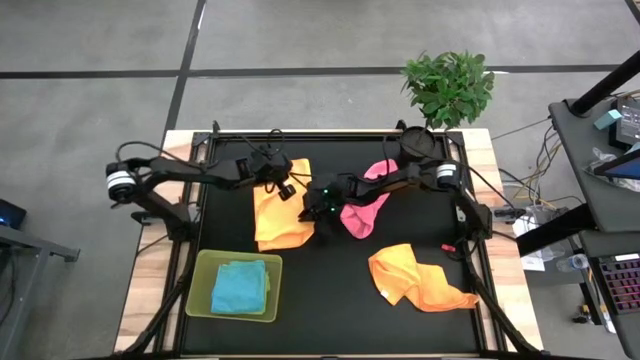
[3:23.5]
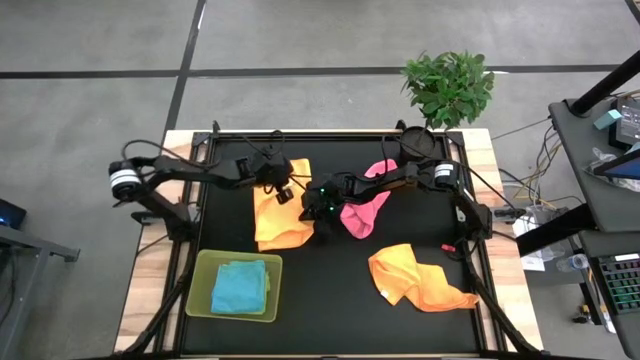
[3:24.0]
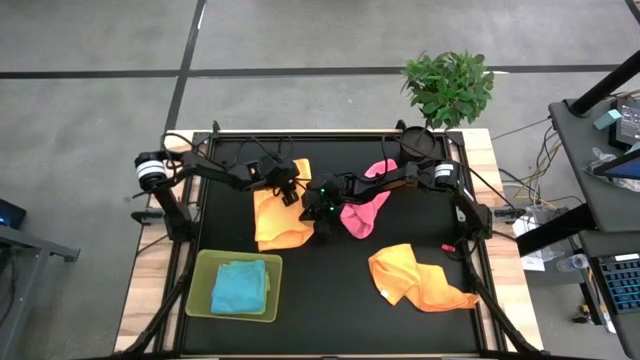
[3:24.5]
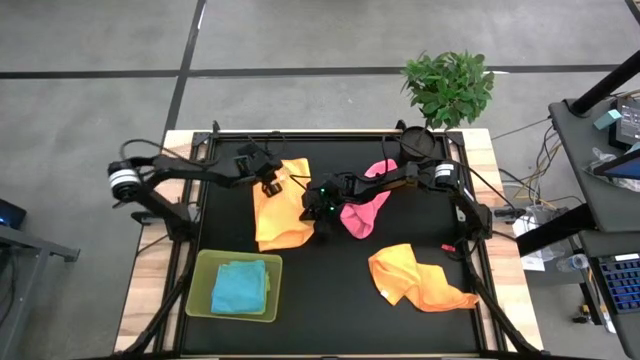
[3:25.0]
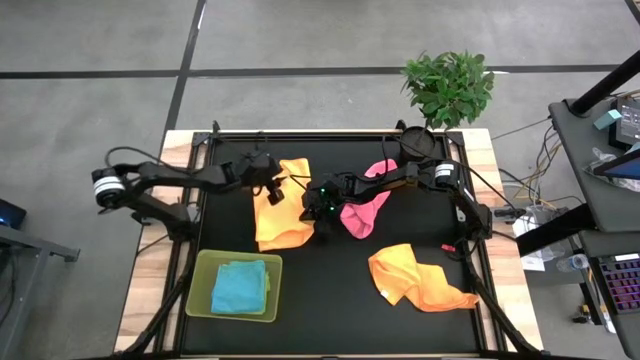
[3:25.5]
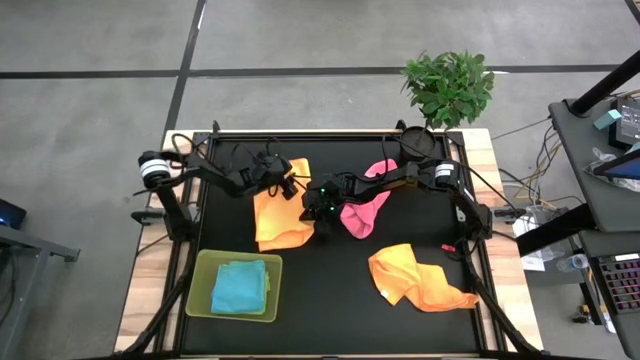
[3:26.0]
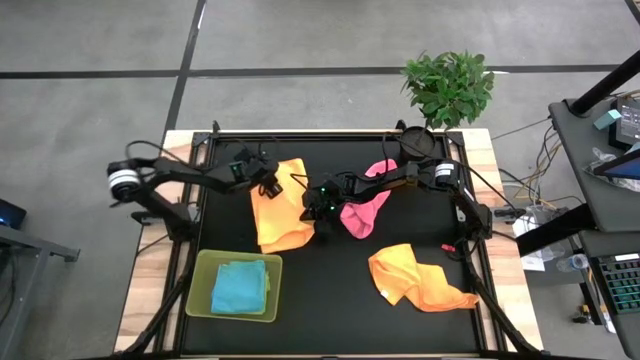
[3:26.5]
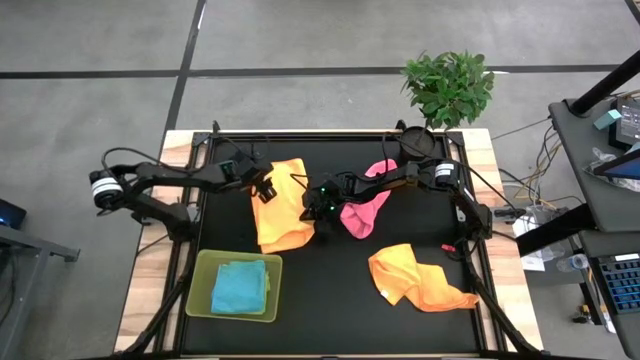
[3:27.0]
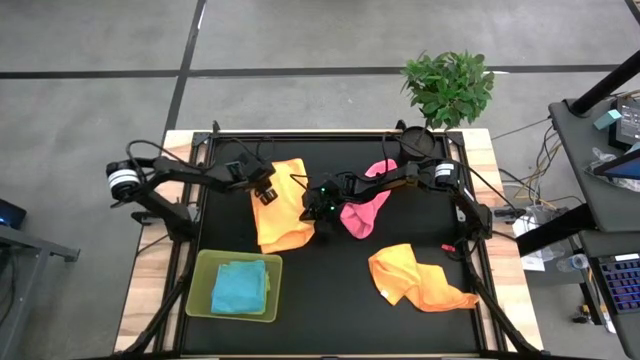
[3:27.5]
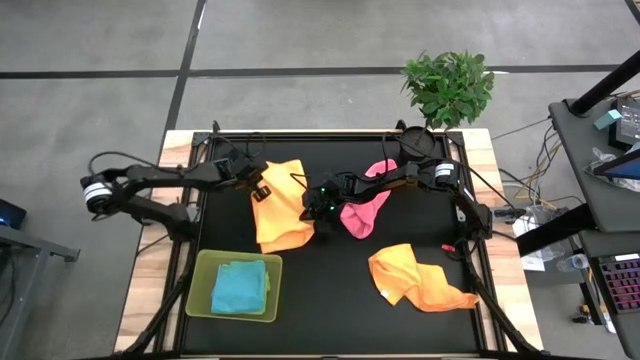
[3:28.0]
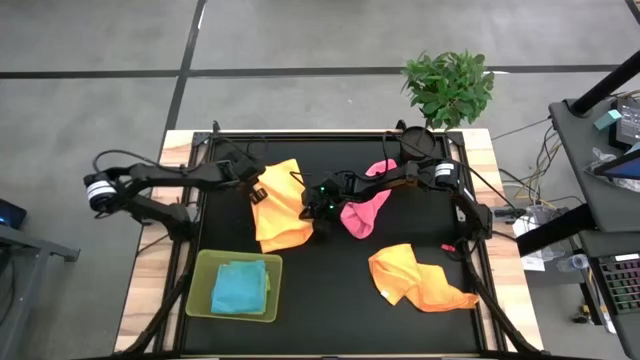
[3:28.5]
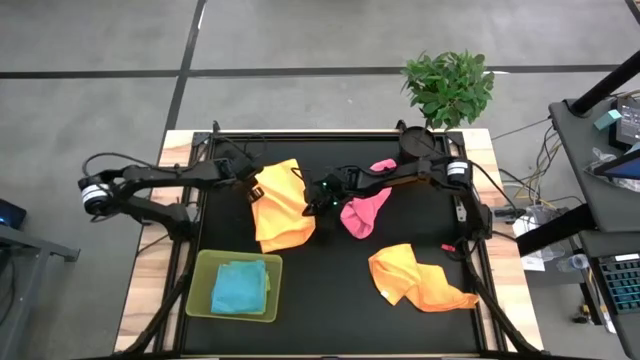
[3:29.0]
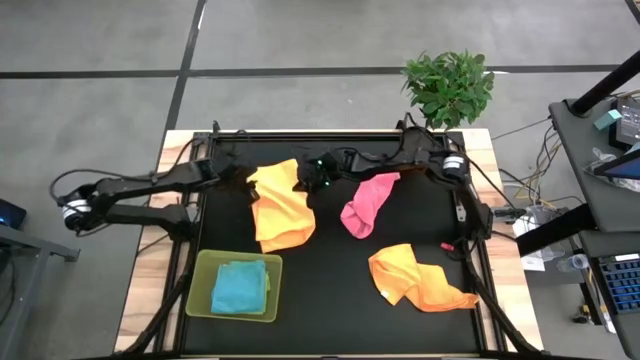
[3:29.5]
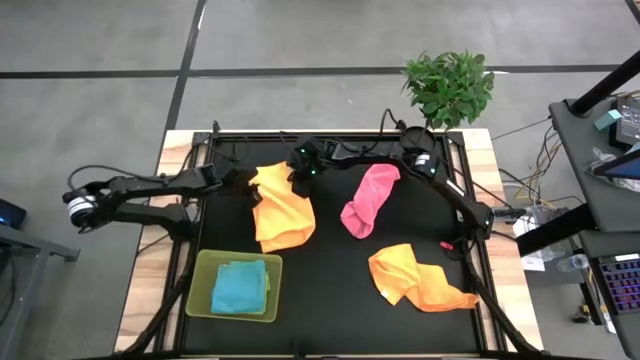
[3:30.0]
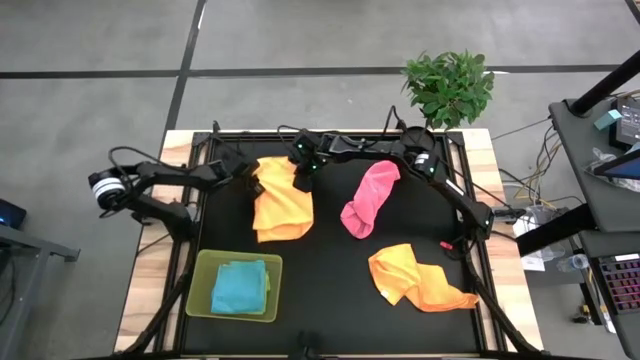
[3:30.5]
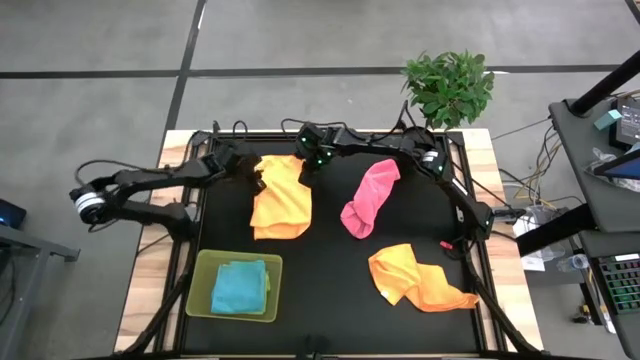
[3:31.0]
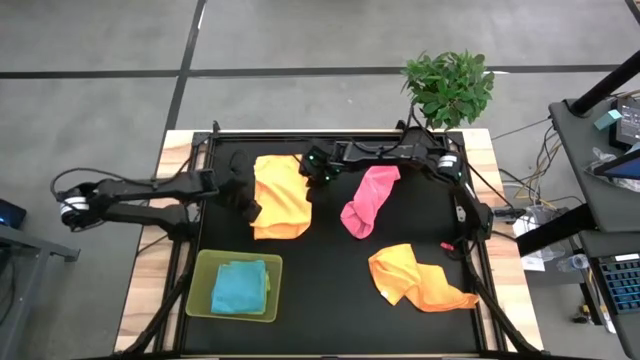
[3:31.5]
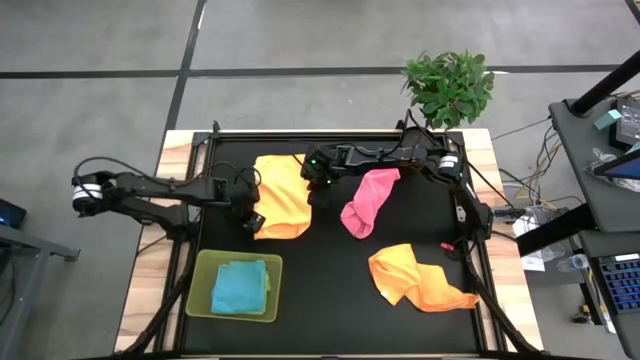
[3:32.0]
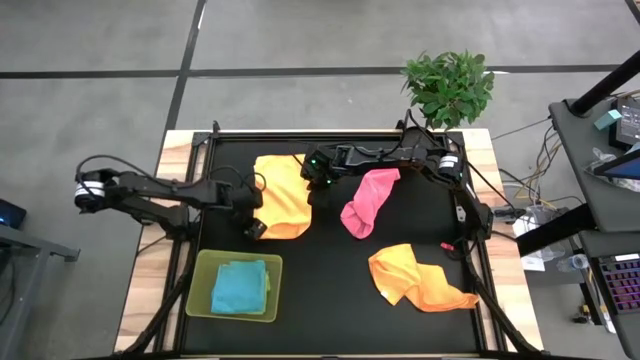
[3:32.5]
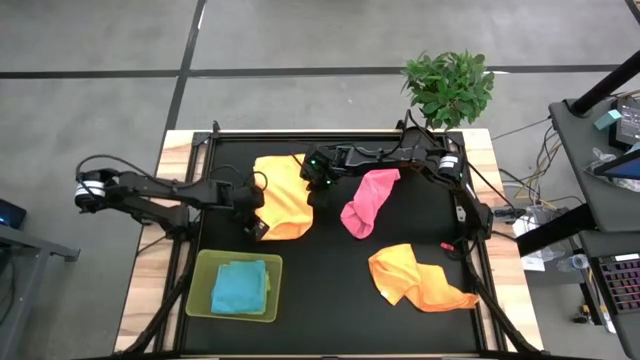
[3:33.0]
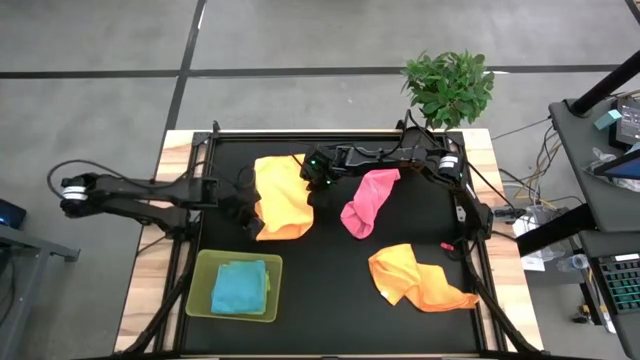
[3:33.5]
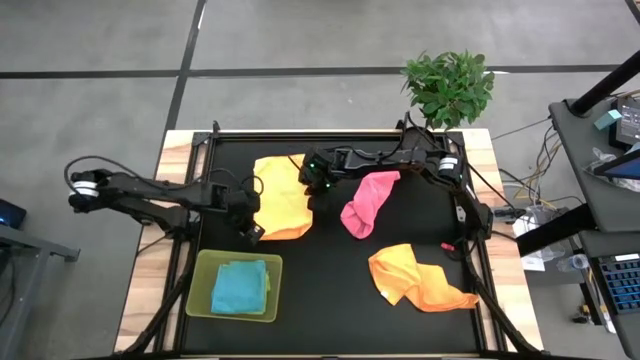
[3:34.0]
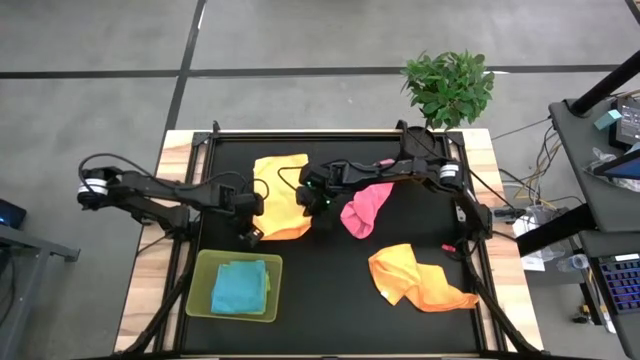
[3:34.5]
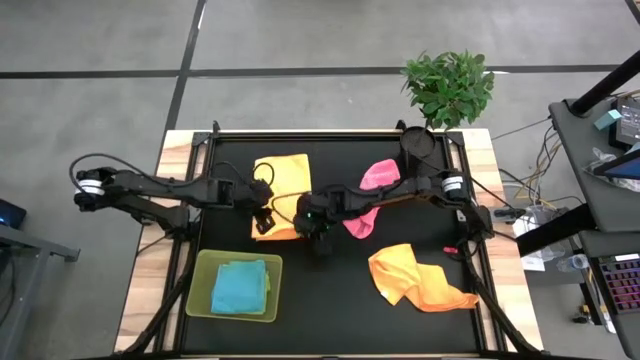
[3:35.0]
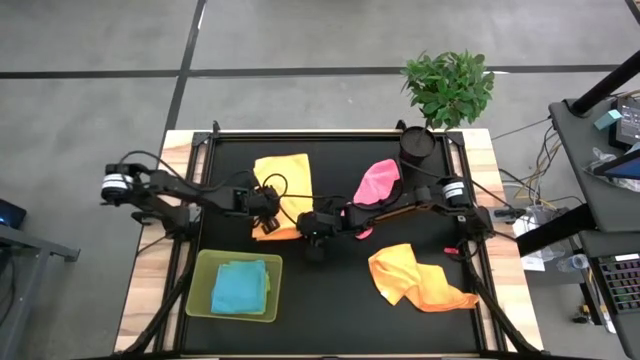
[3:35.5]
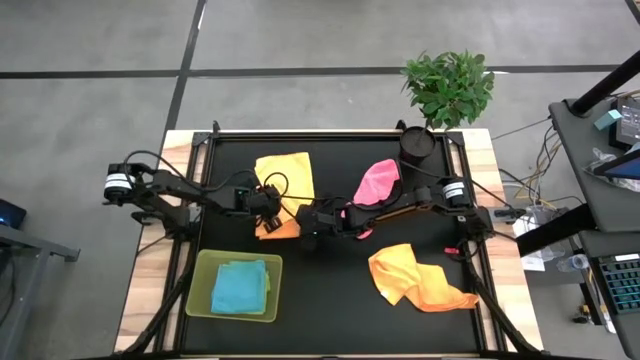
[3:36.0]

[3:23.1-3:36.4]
Task: Fold microfiber towels
Fold the top orange microfiber towel

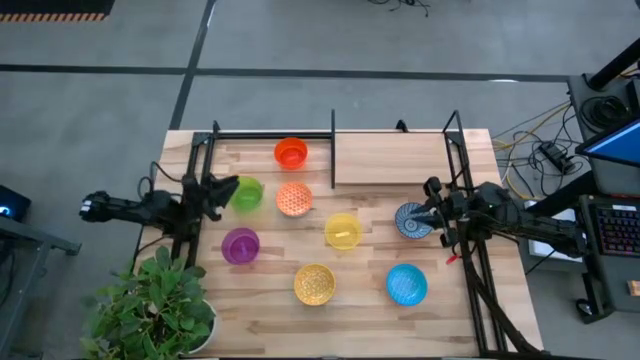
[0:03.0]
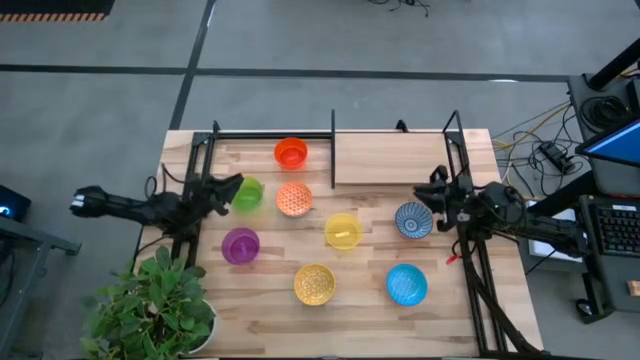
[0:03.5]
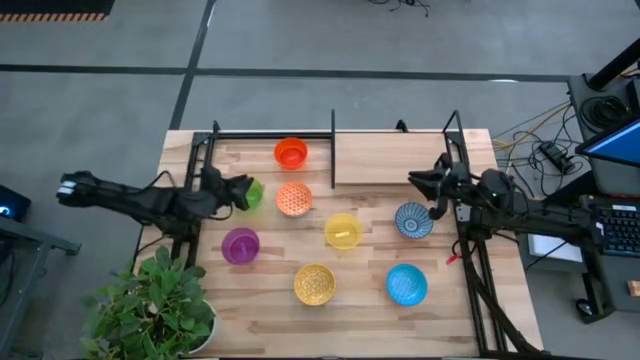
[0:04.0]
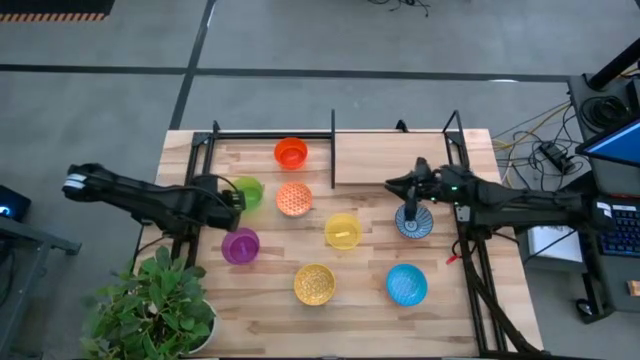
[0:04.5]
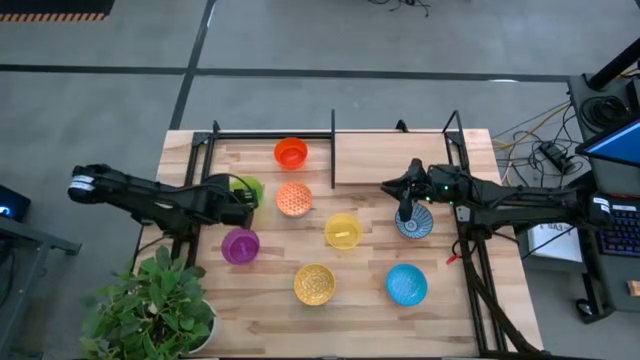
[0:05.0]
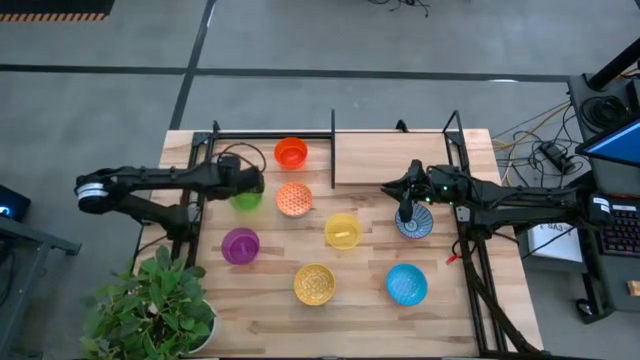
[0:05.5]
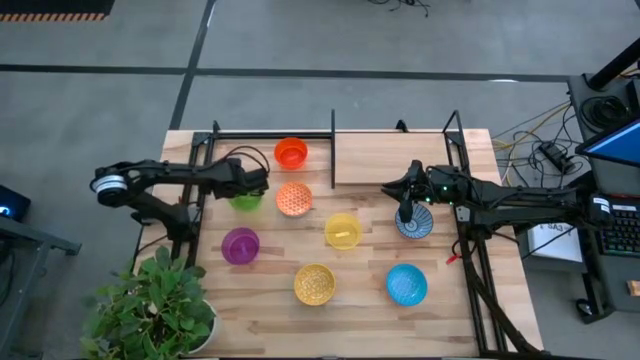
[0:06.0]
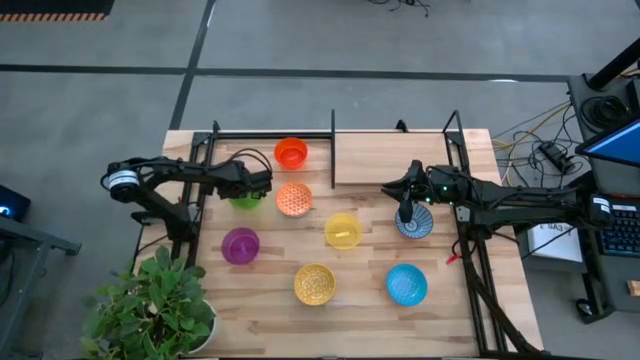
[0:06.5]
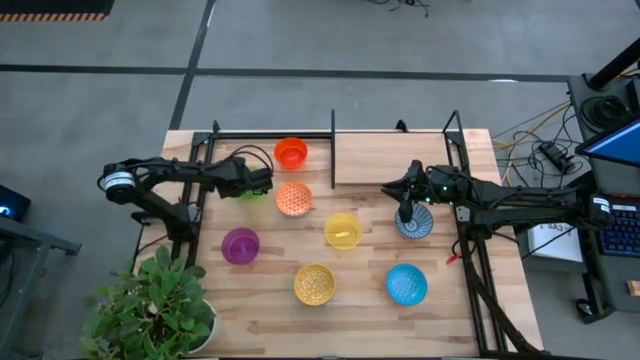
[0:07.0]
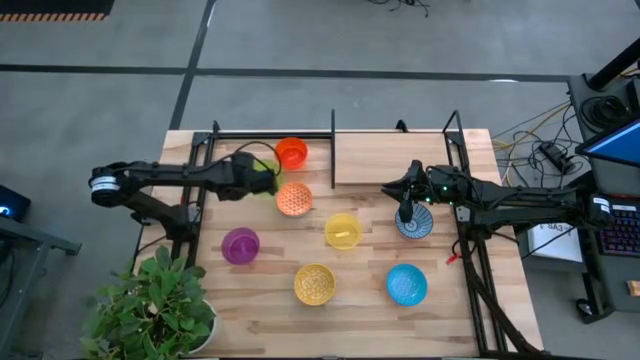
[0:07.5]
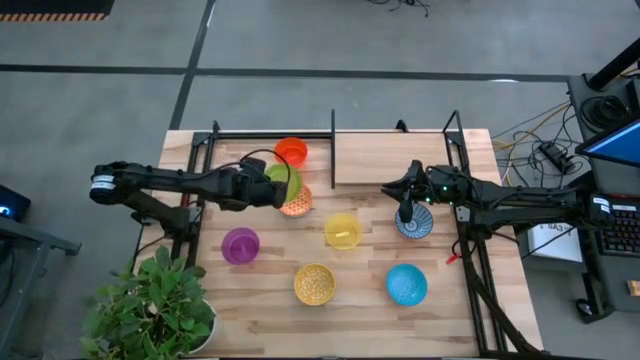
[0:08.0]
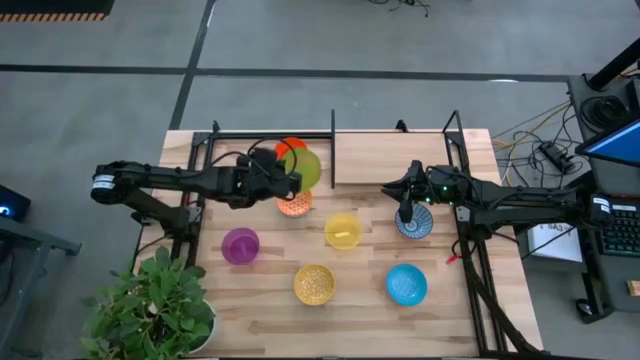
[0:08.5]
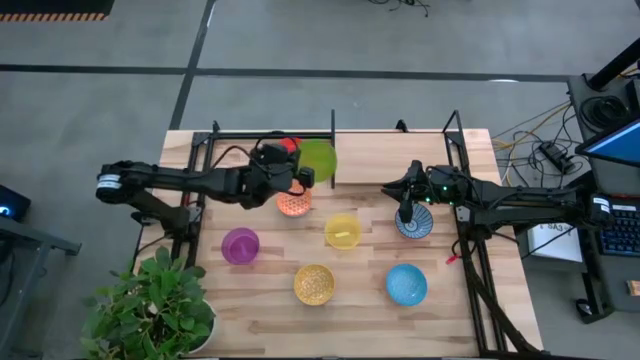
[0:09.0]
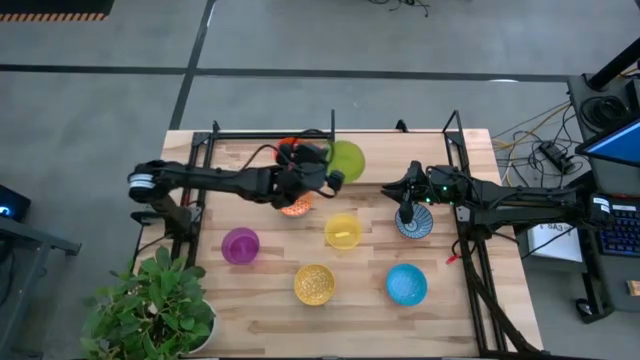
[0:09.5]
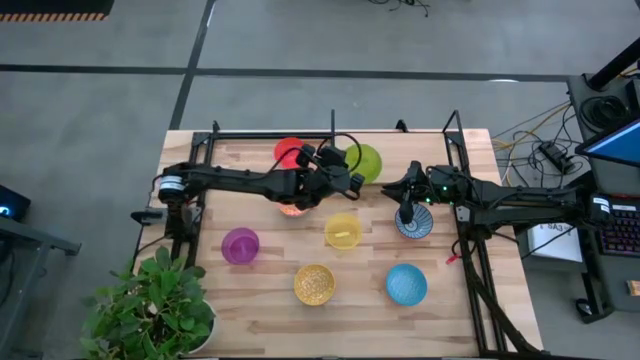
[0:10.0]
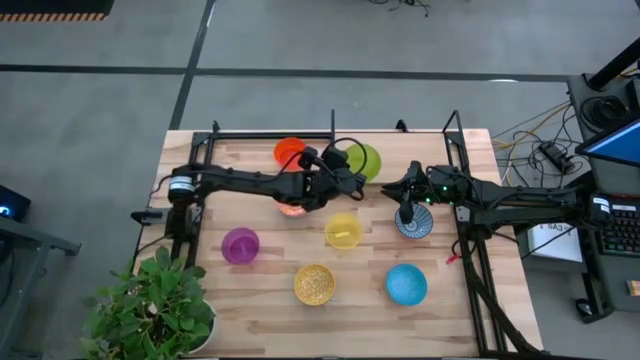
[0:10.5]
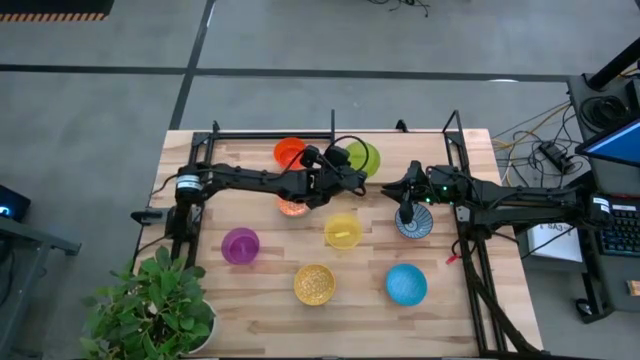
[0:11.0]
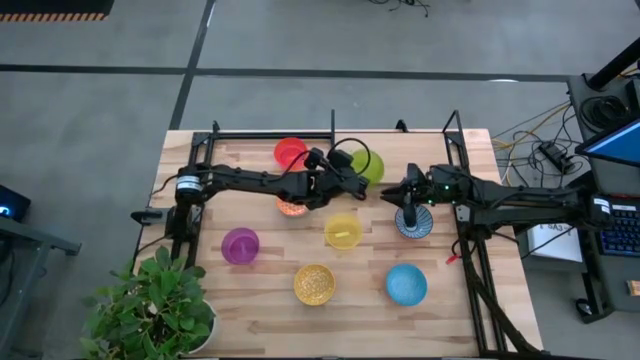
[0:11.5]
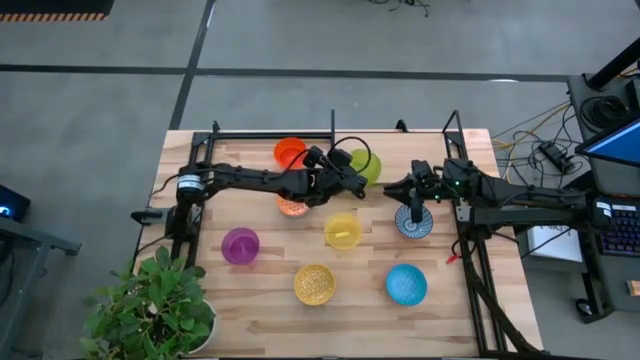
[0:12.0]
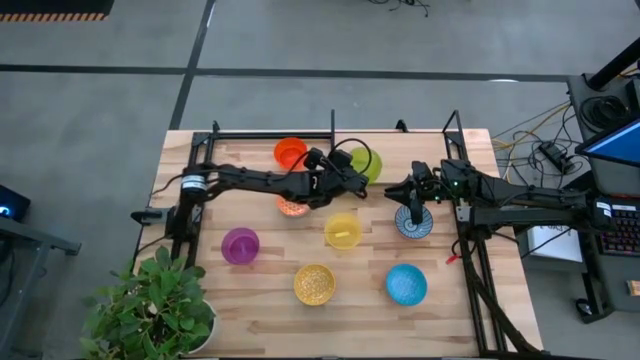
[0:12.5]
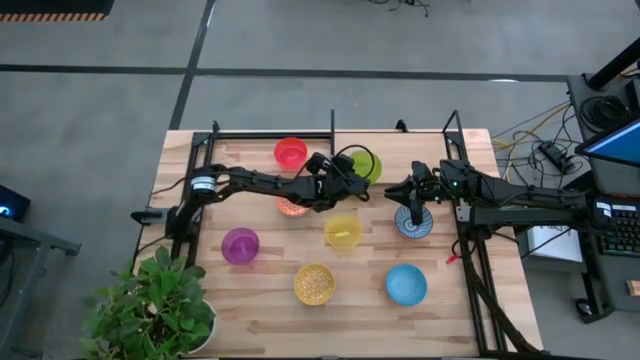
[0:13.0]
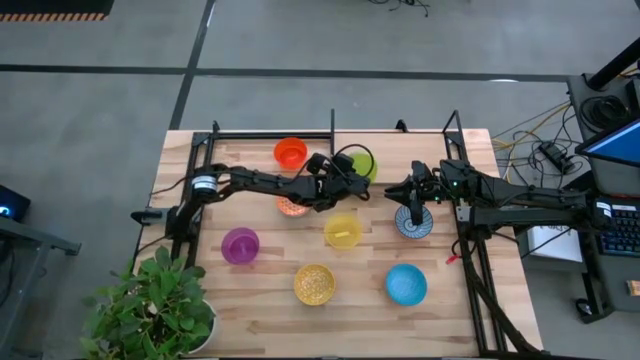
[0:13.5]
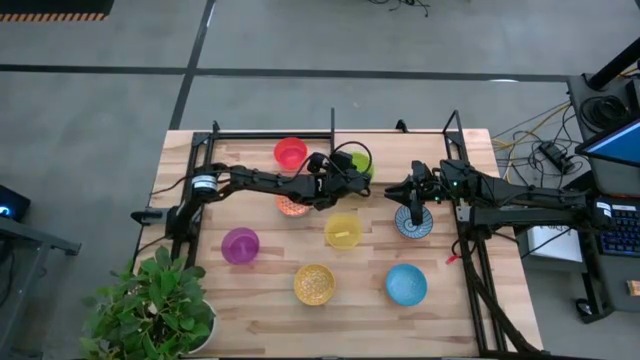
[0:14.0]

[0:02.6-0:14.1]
Task: Place and stack bowls onto a shelf
Put the green bowl on the shelf
